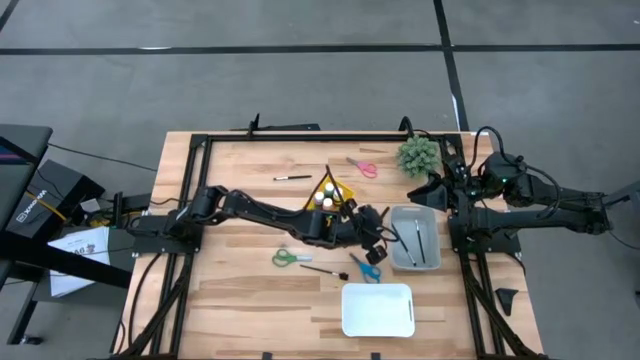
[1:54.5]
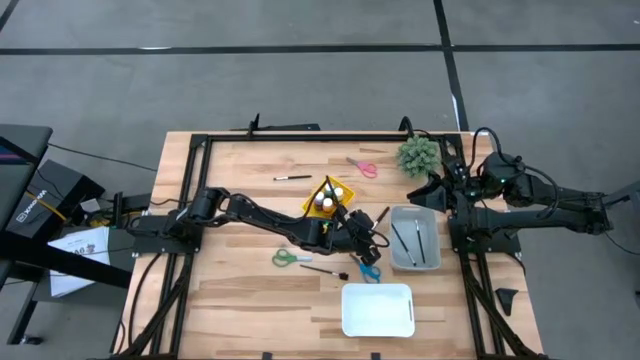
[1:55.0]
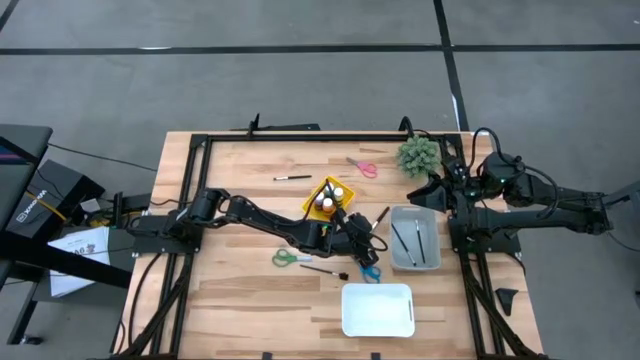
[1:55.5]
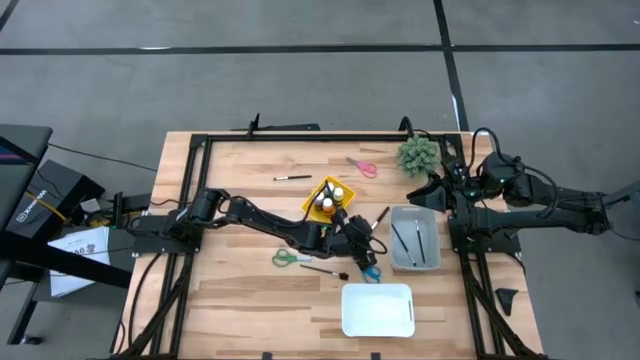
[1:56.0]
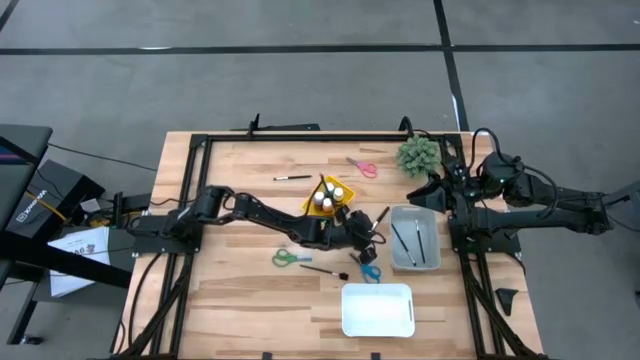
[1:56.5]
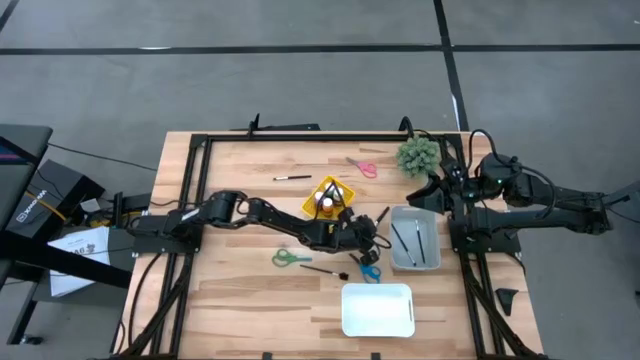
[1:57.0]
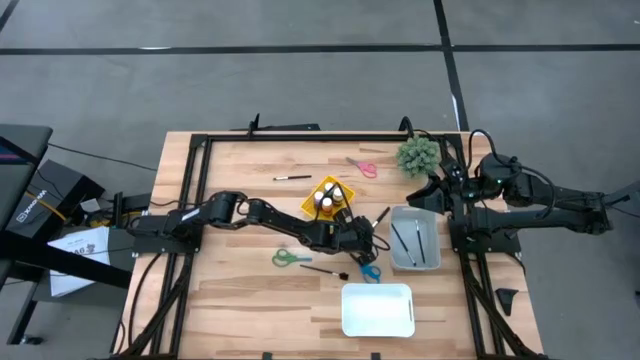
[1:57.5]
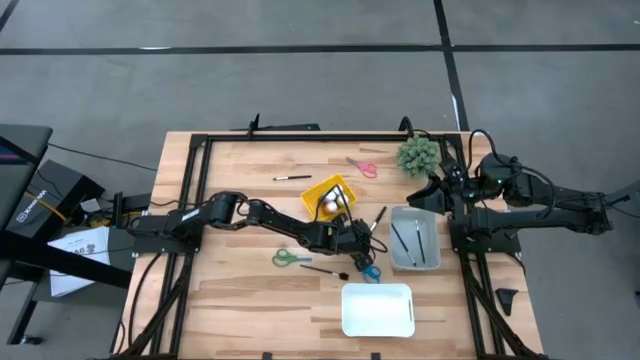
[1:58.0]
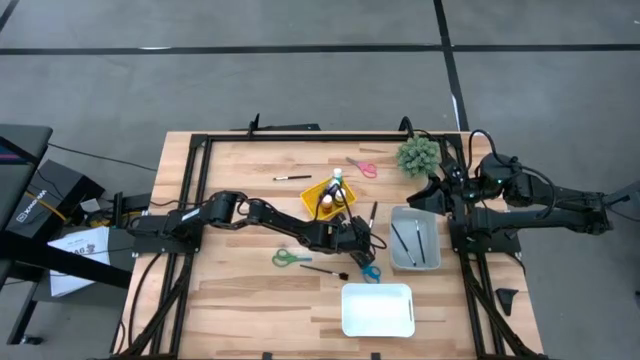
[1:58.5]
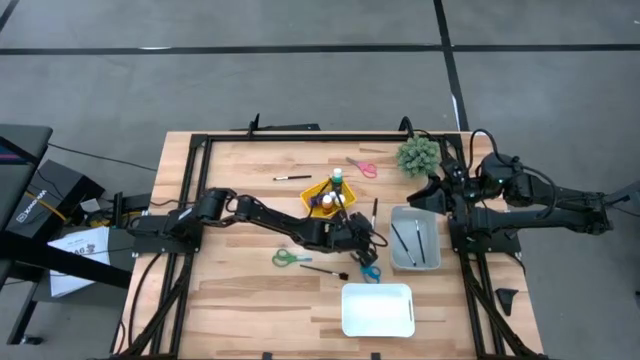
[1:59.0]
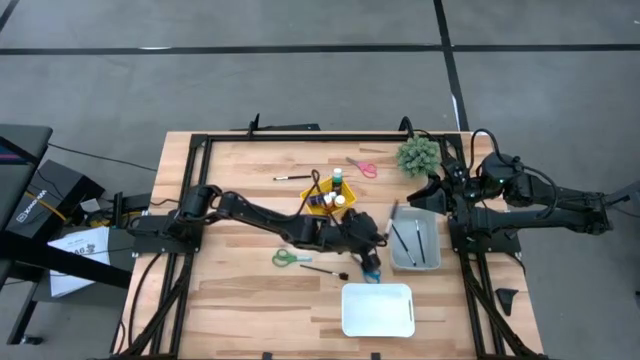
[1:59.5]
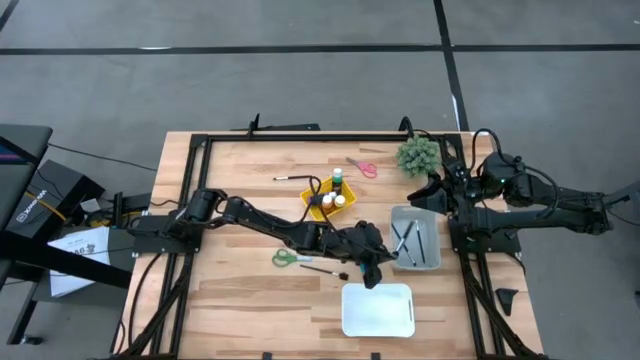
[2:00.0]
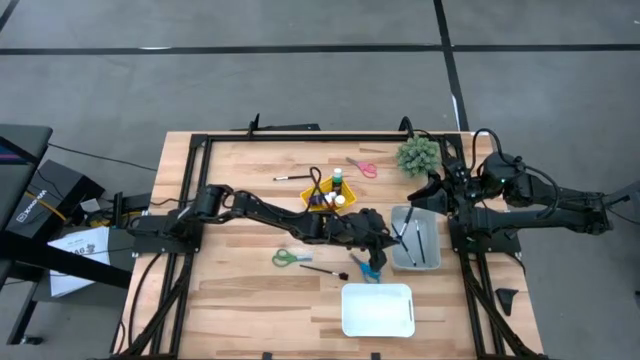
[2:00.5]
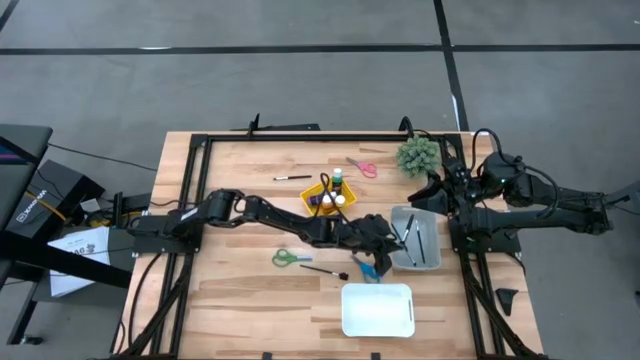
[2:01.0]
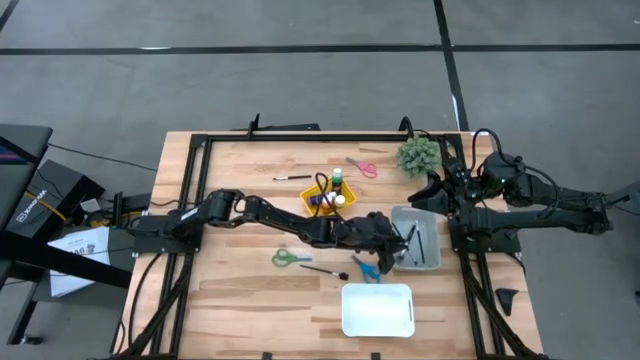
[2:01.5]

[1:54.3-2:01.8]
Task: Pick & Place Paint Supplies
Put the black powder brush into the gray bin

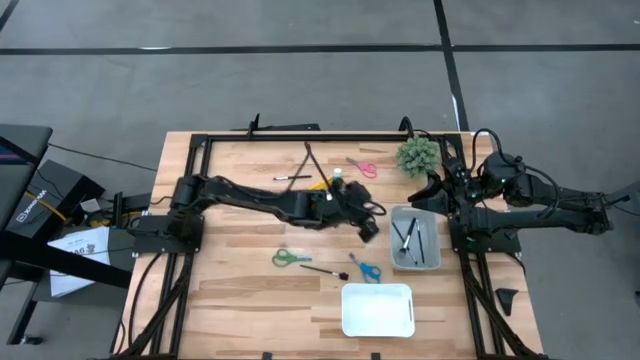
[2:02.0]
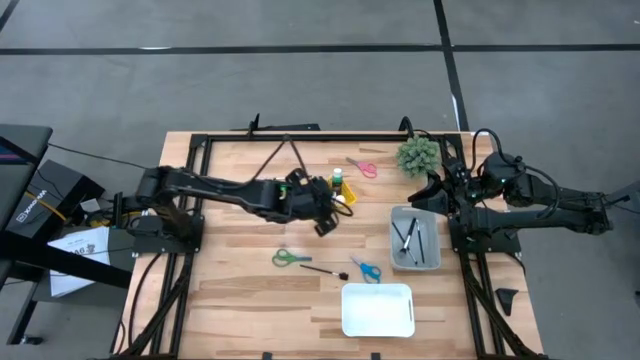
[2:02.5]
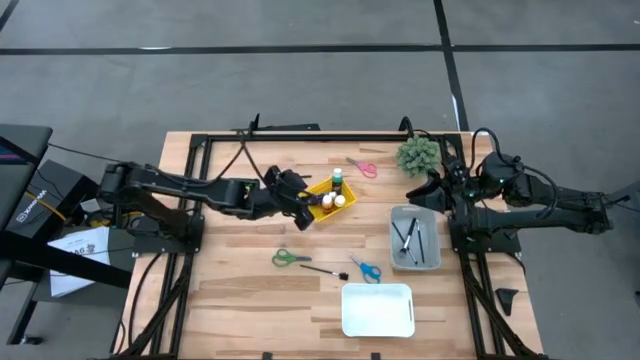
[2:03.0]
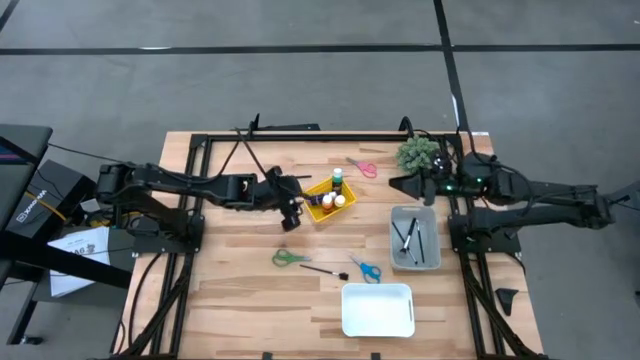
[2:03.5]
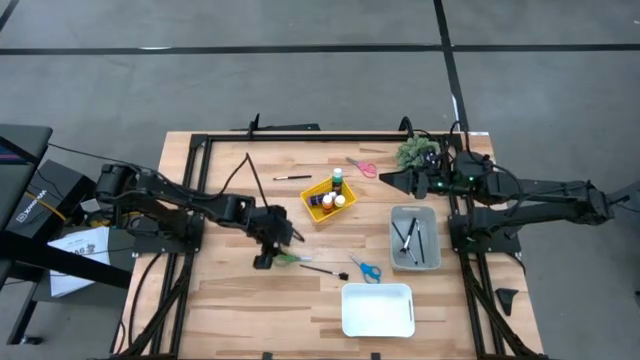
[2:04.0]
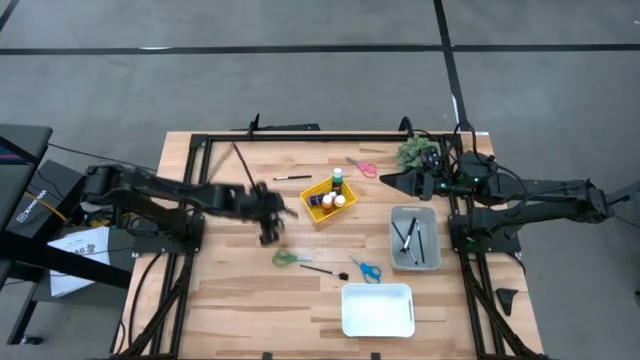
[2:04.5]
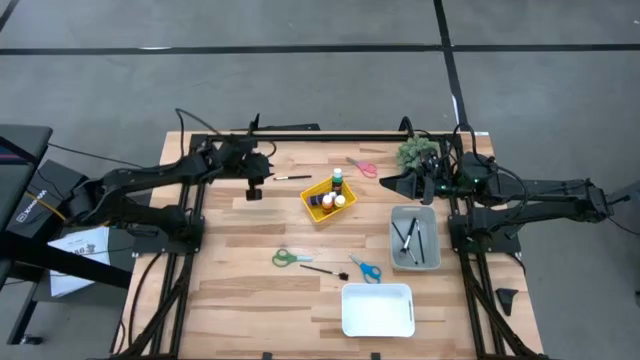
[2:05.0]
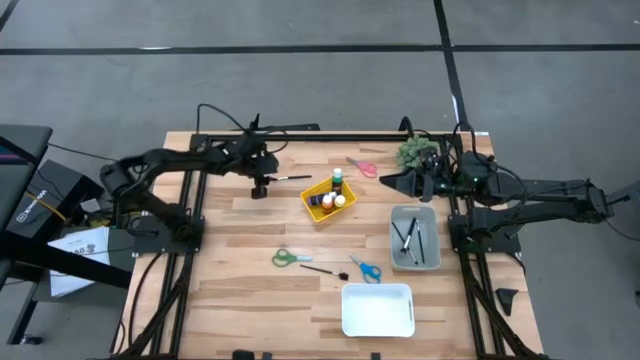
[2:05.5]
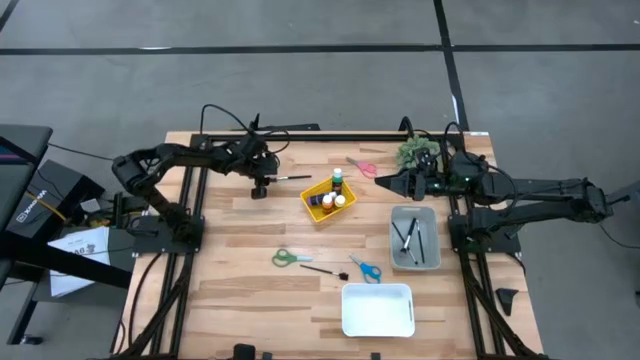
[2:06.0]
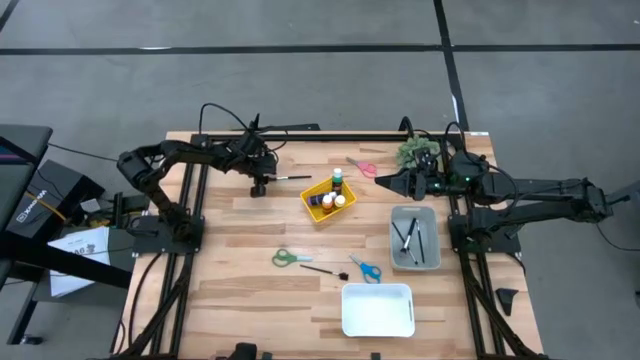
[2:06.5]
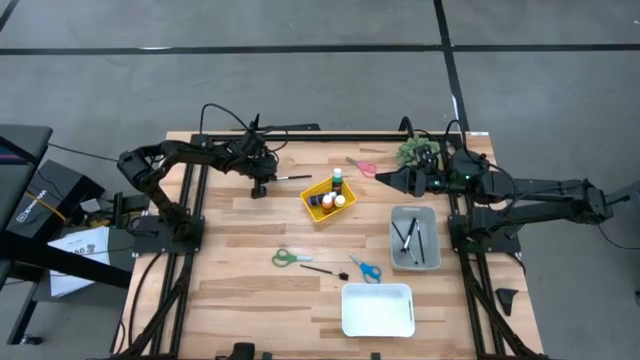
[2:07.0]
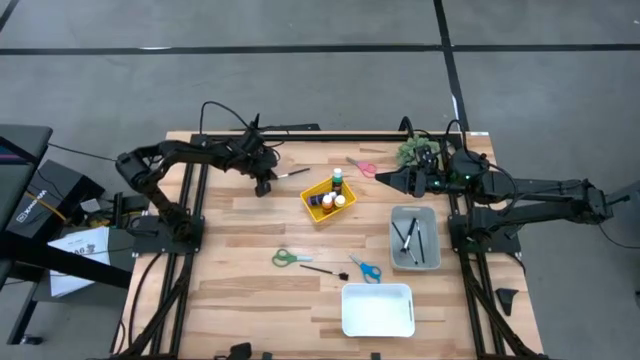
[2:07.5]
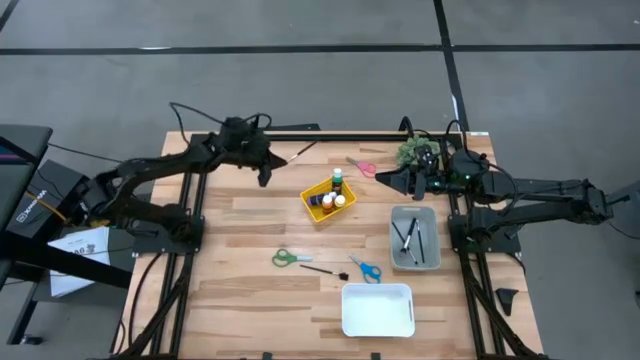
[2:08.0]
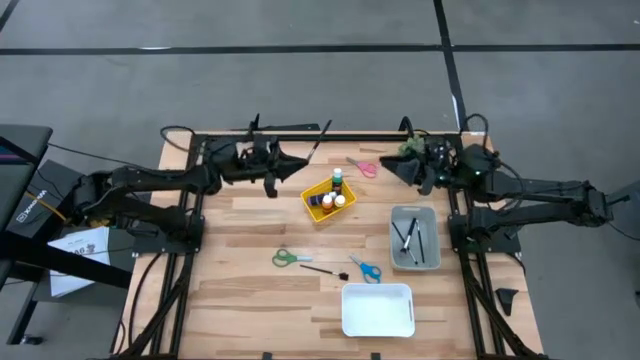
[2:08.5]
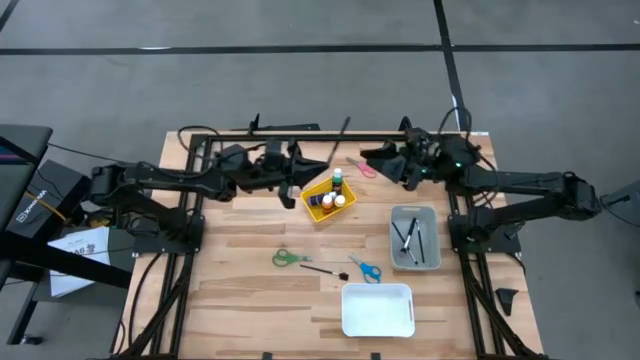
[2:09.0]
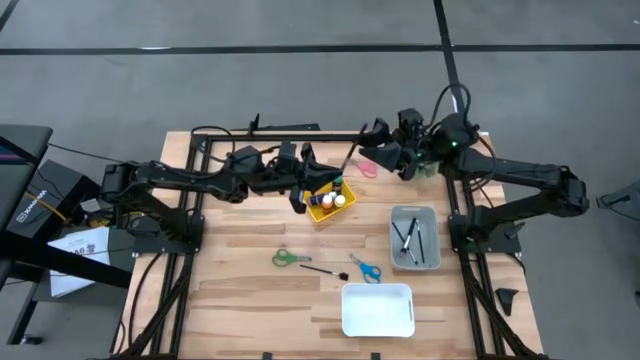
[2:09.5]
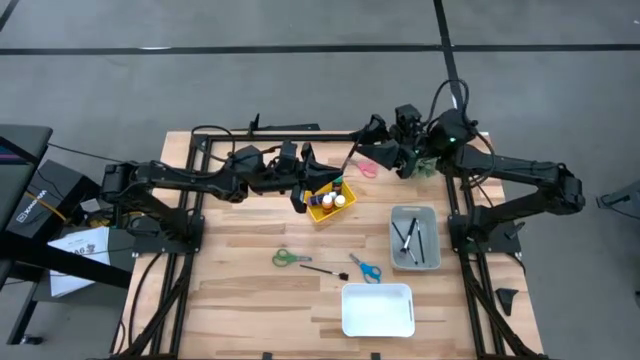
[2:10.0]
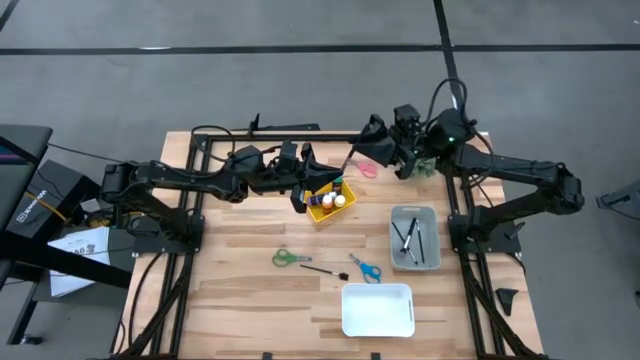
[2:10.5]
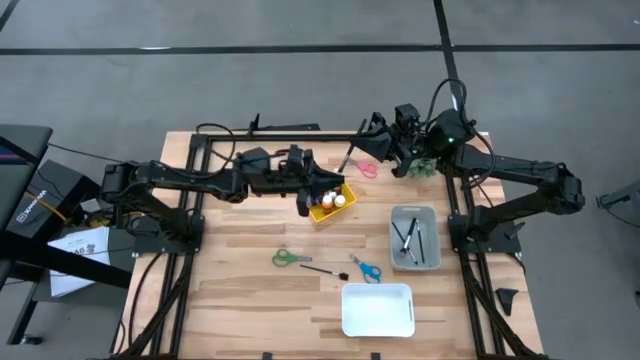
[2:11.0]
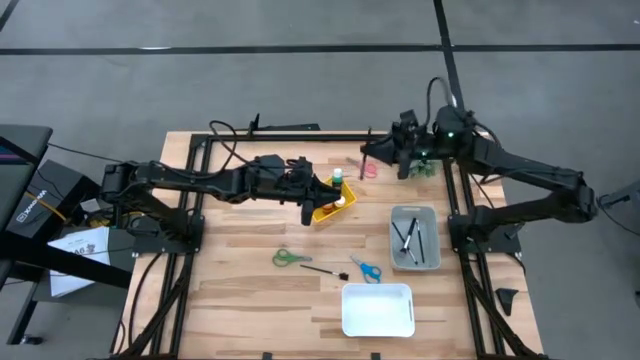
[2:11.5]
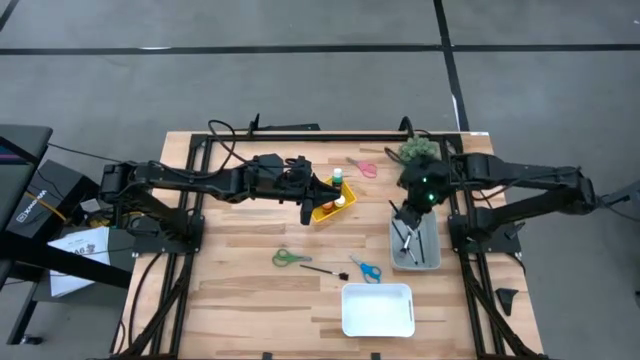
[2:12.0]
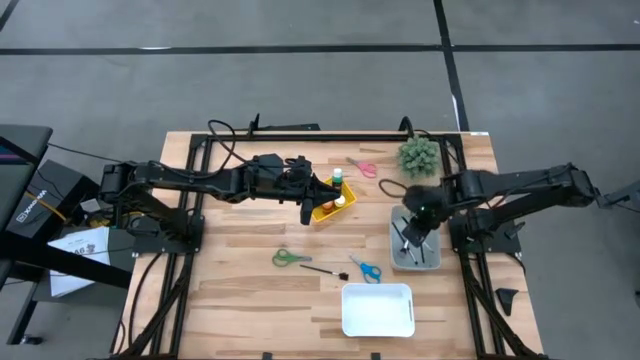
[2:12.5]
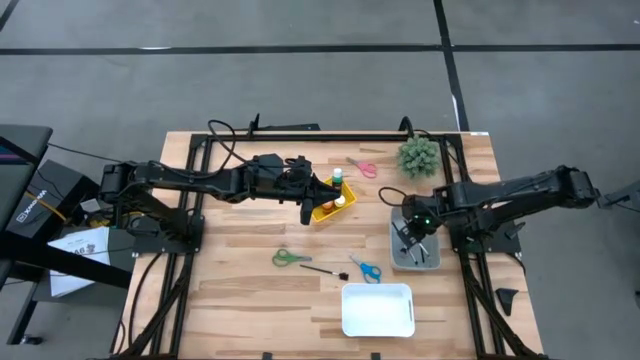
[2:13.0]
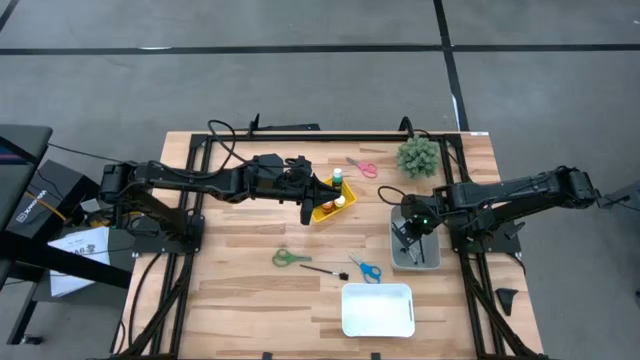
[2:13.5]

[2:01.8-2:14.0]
Put the black eyeshadow brush into the gray bin
